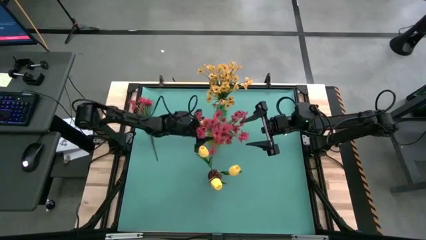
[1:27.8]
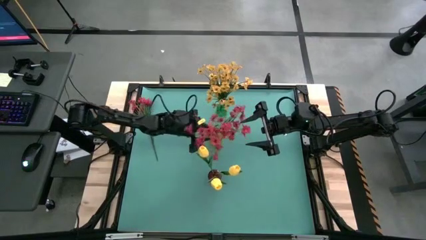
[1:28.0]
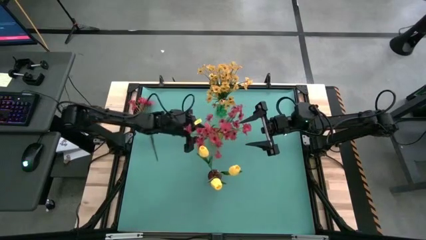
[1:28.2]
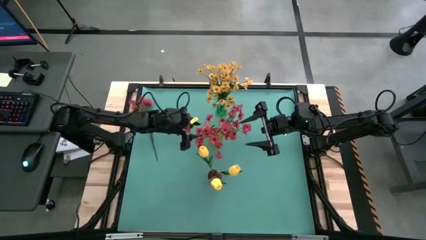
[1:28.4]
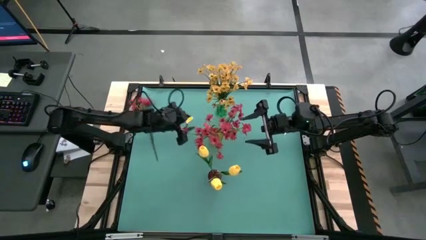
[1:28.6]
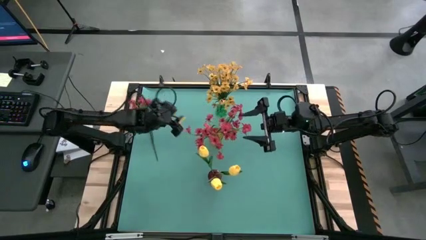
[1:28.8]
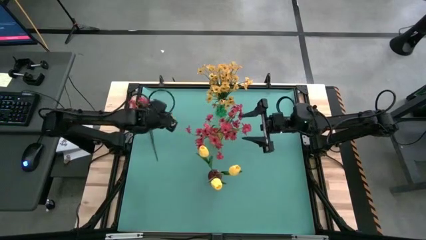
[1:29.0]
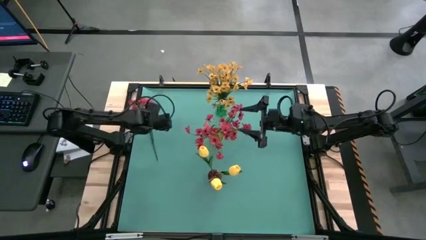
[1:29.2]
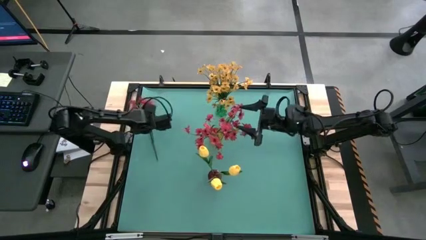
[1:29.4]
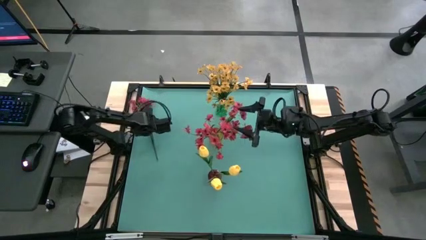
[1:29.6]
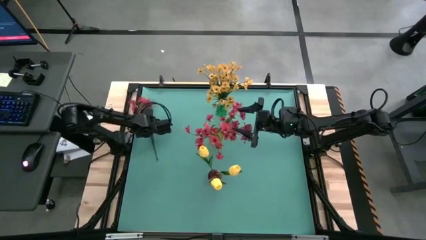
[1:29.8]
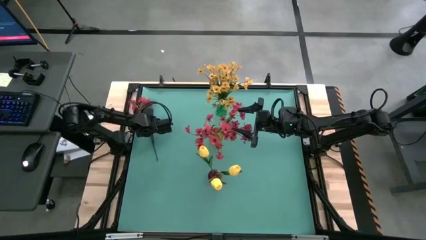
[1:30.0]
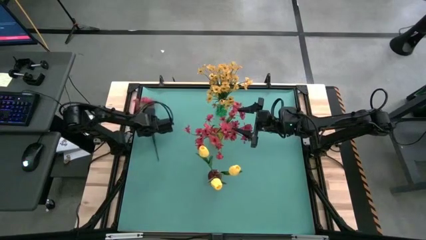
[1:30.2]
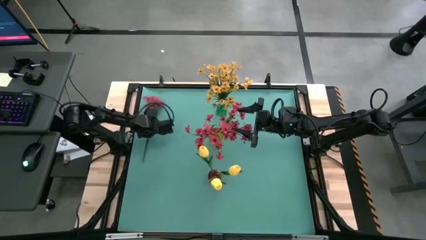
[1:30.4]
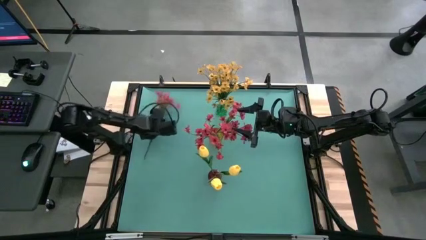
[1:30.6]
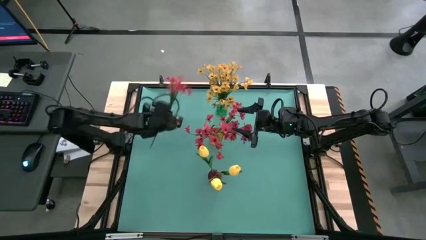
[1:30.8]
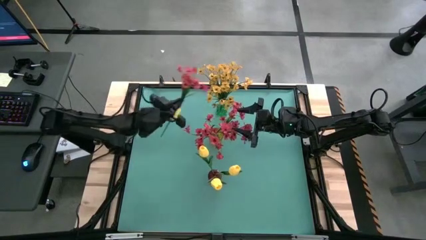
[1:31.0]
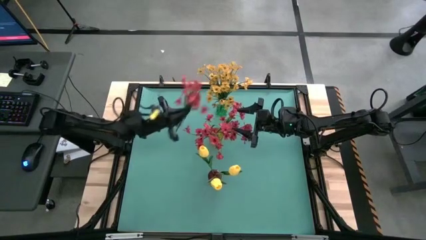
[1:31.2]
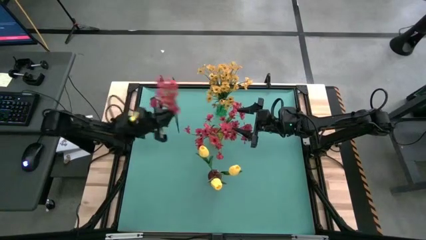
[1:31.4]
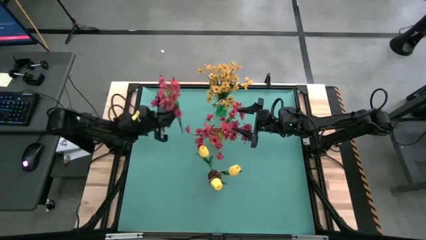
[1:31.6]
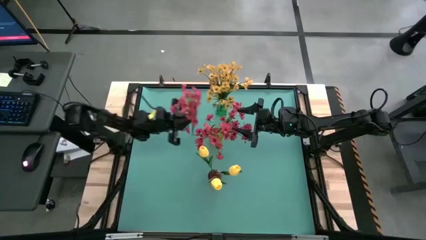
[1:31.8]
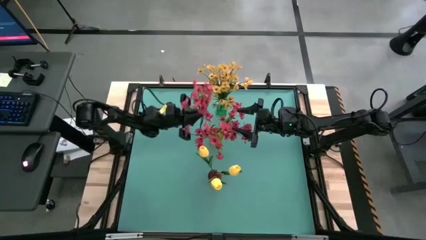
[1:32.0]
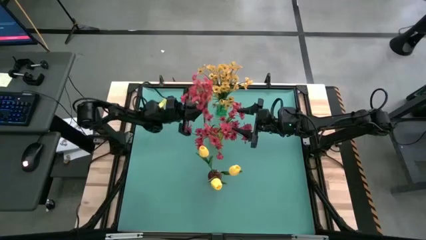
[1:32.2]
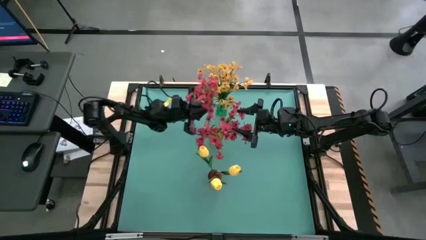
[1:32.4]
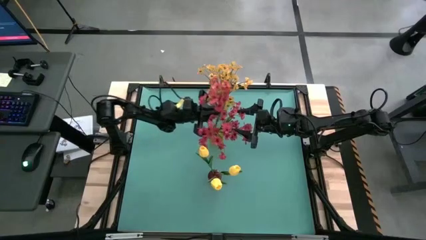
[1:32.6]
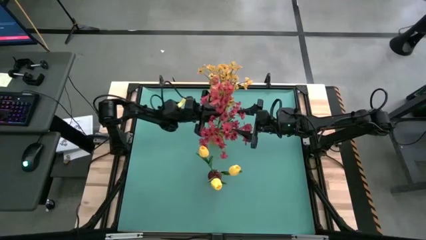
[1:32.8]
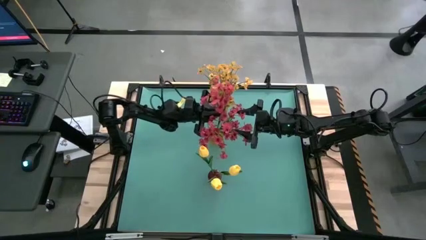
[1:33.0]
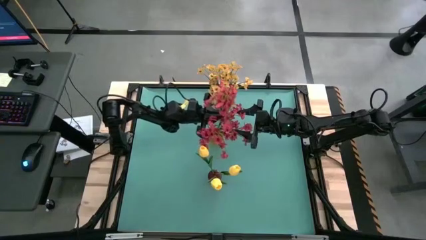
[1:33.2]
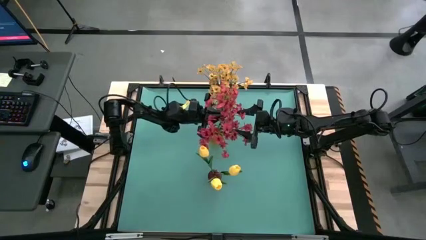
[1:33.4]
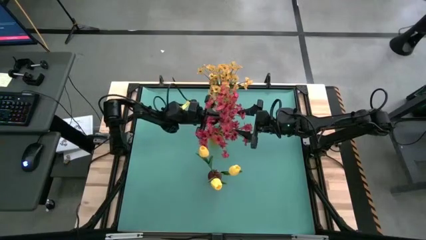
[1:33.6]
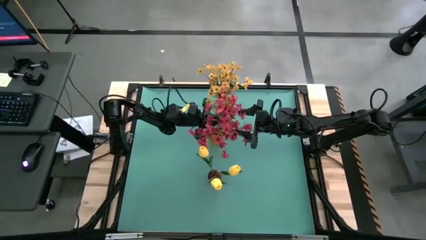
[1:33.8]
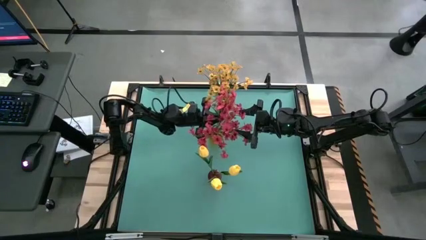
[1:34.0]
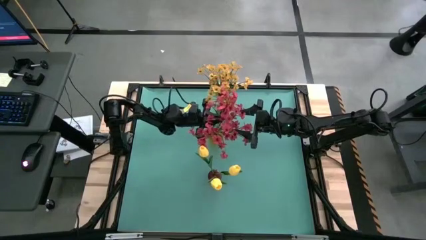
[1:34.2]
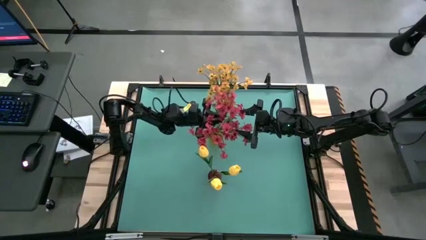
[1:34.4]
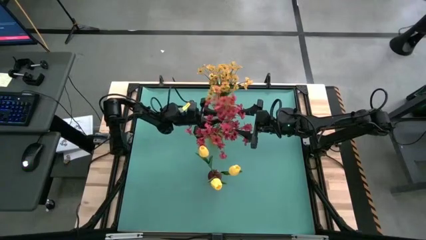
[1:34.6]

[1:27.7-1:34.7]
Task: Sort flowers into vase by color
Put the red flowers into the yellow vase

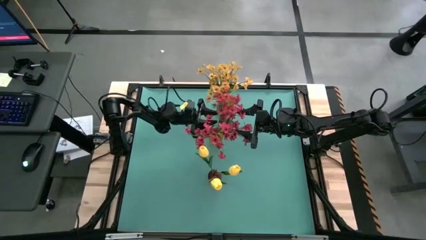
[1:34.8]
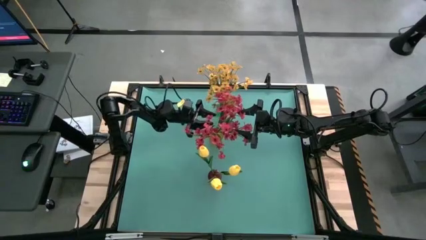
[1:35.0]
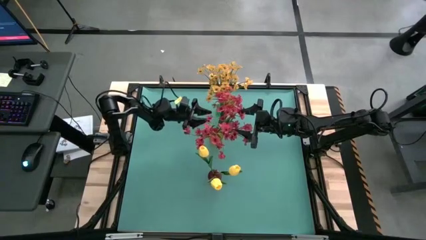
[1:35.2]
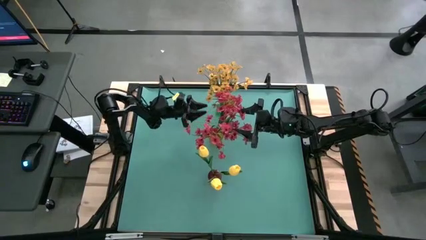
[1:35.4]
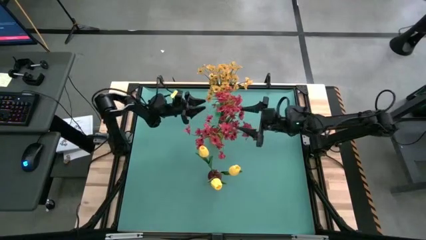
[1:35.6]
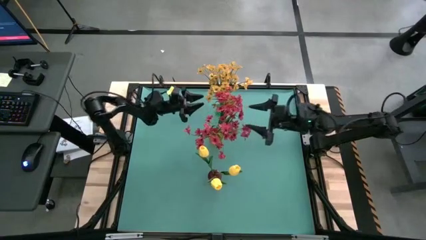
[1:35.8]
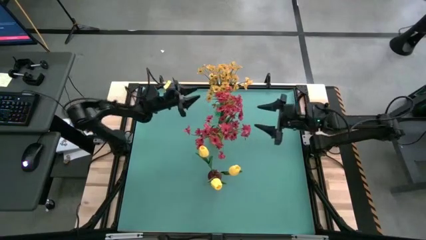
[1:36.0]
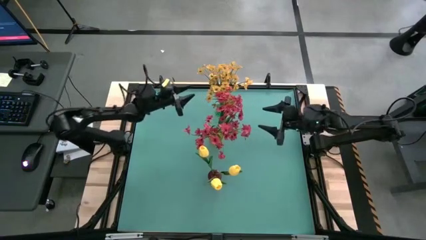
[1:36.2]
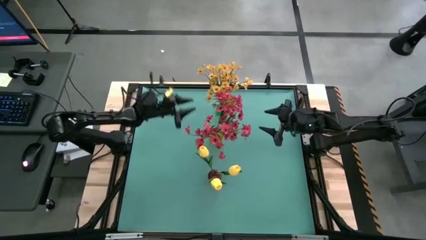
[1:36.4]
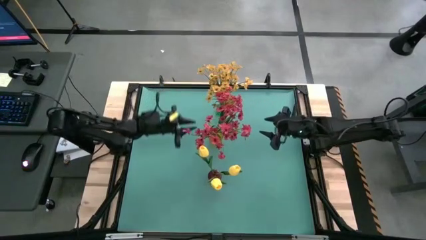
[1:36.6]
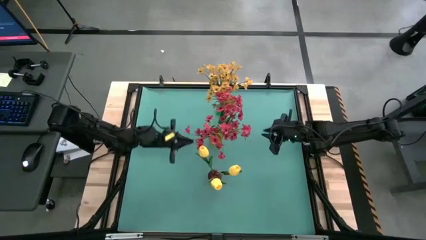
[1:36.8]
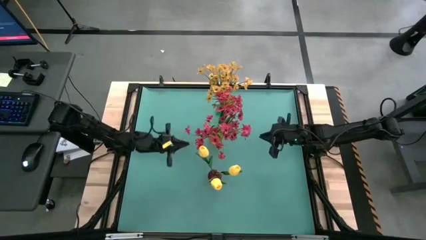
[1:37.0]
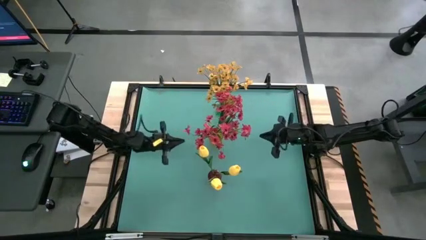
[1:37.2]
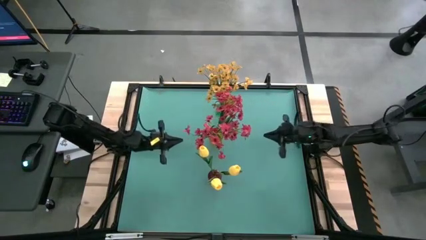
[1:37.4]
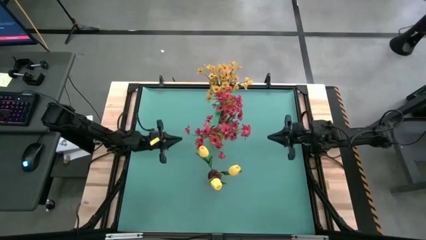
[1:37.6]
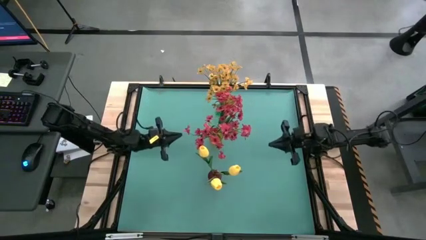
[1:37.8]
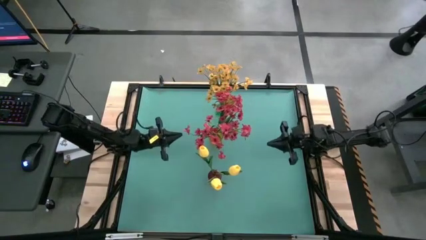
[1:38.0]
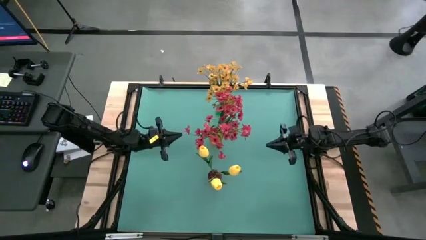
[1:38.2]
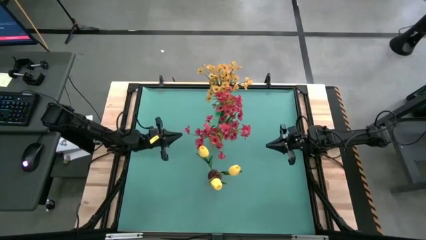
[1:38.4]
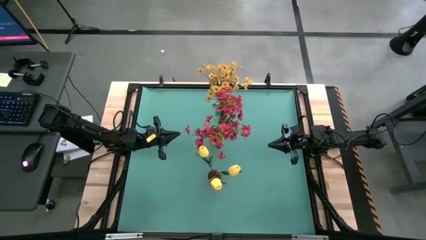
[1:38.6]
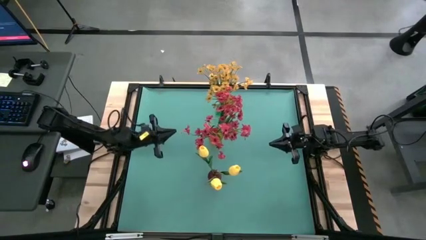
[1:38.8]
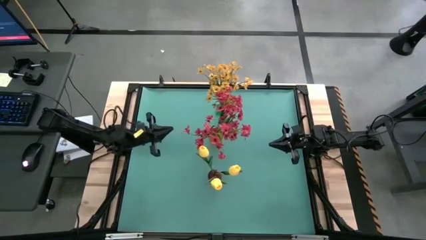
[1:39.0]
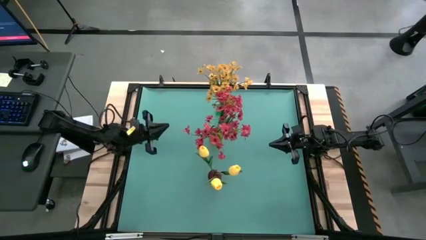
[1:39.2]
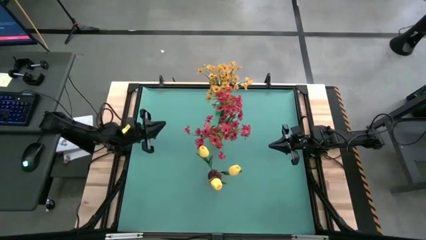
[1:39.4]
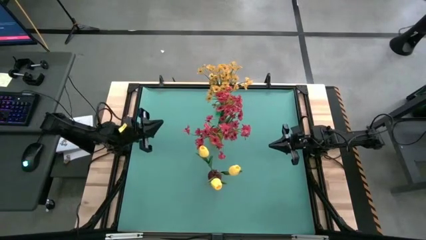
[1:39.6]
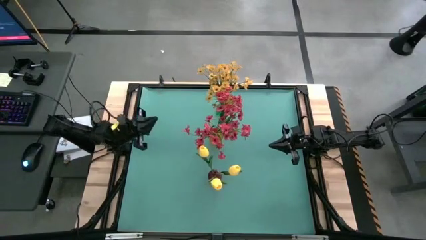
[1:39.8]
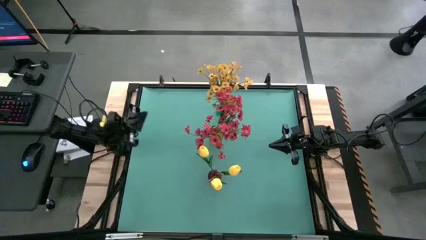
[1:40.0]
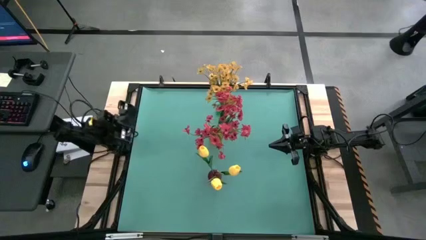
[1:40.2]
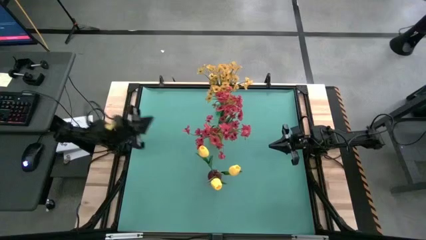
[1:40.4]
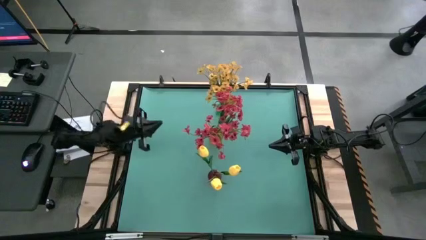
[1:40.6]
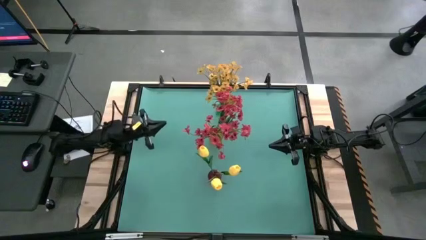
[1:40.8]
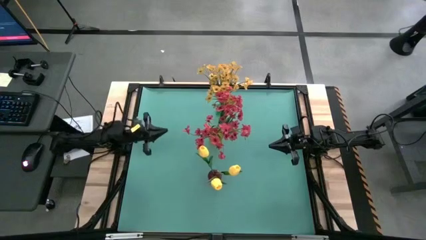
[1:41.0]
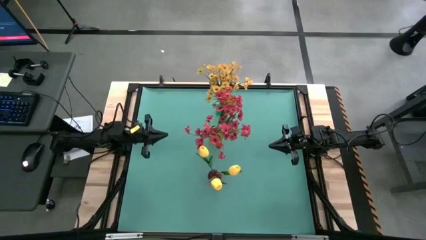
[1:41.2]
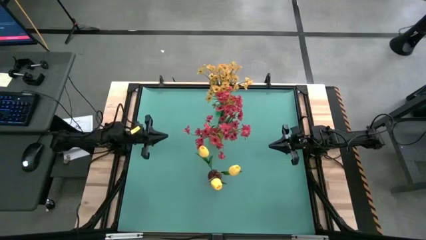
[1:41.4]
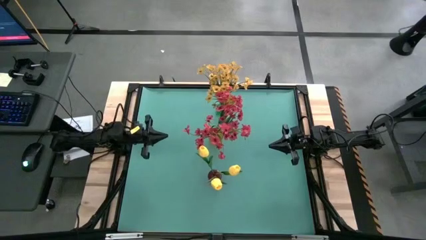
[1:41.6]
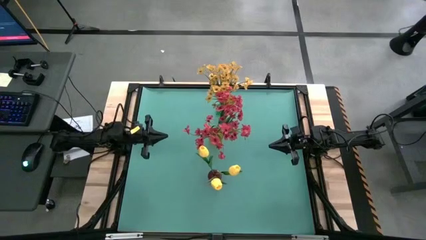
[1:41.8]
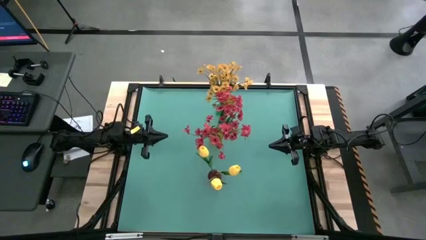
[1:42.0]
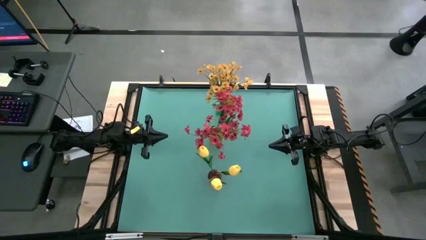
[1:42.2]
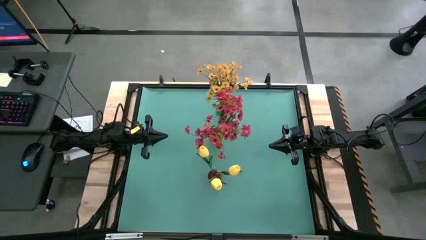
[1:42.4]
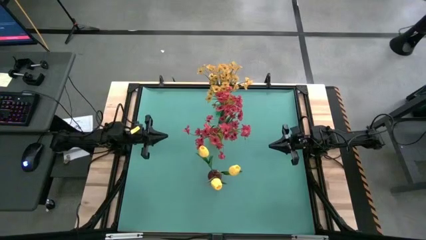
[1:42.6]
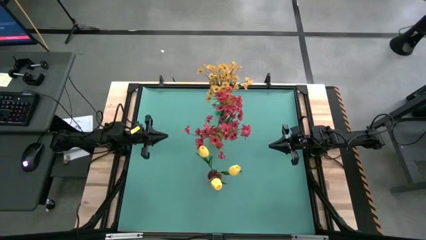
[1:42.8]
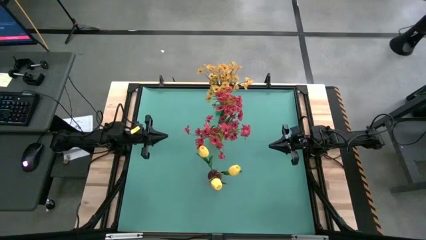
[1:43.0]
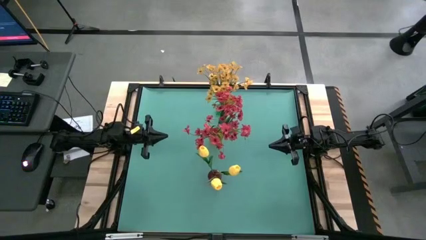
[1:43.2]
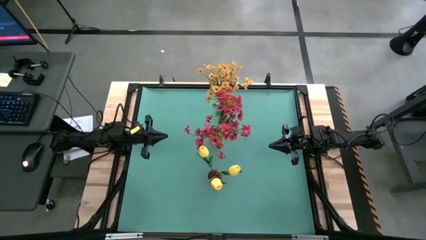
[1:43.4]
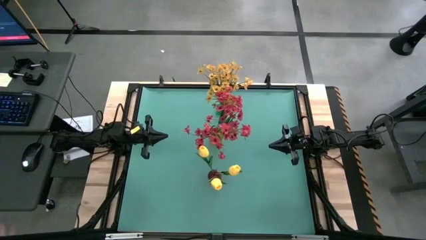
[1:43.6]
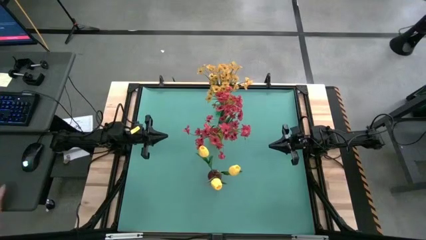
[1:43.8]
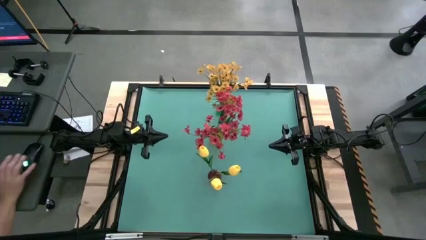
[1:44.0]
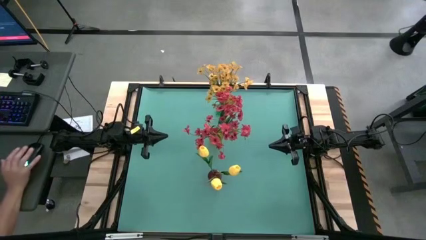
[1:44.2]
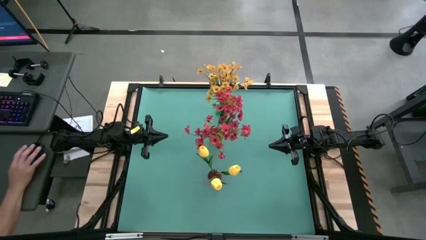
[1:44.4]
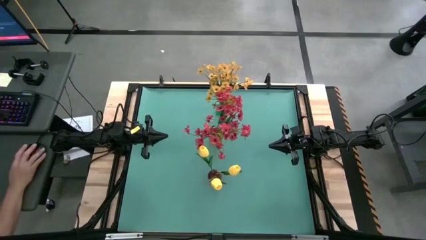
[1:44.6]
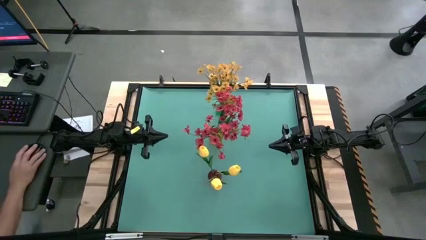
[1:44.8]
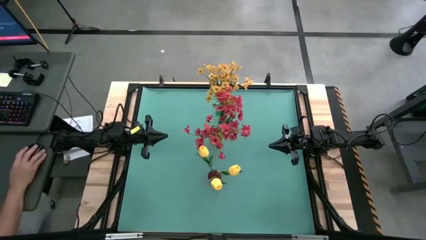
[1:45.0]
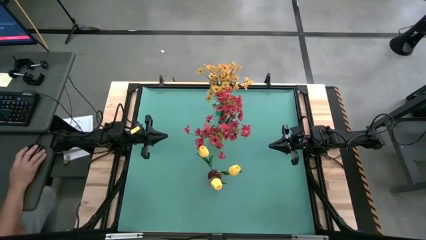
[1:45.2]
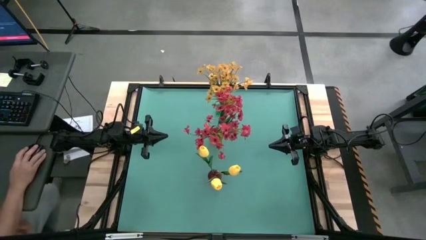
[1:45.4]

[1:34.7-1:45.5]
Return to Home Position
